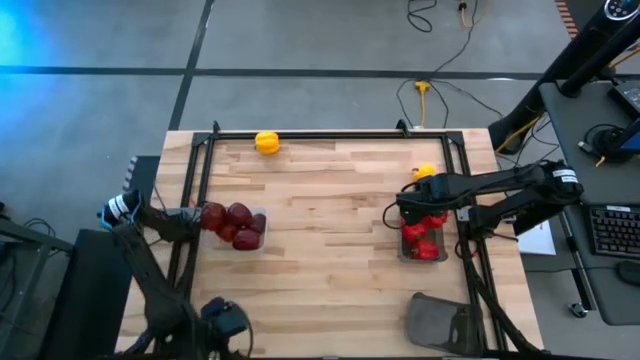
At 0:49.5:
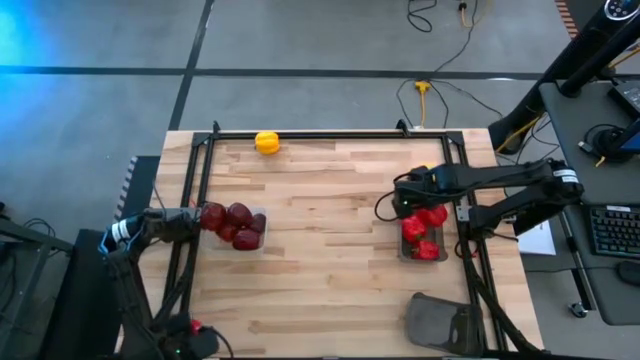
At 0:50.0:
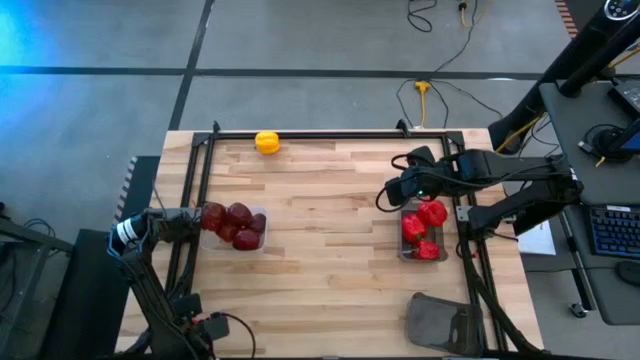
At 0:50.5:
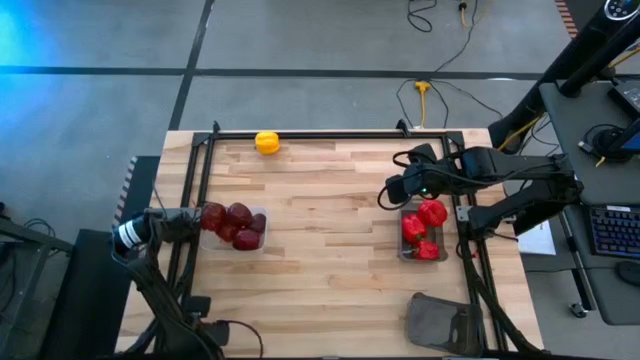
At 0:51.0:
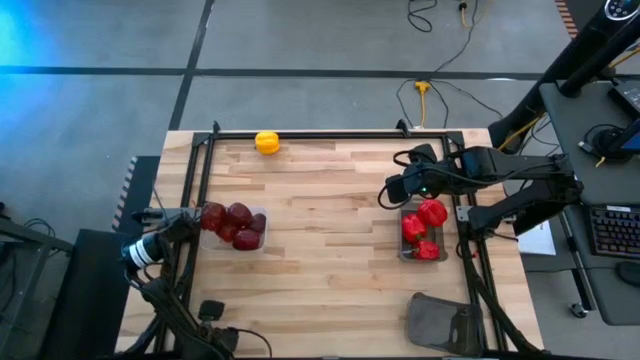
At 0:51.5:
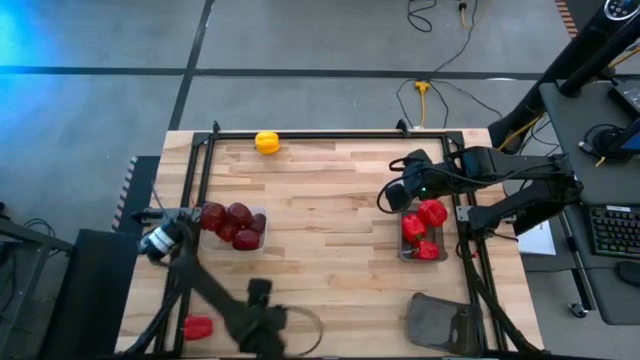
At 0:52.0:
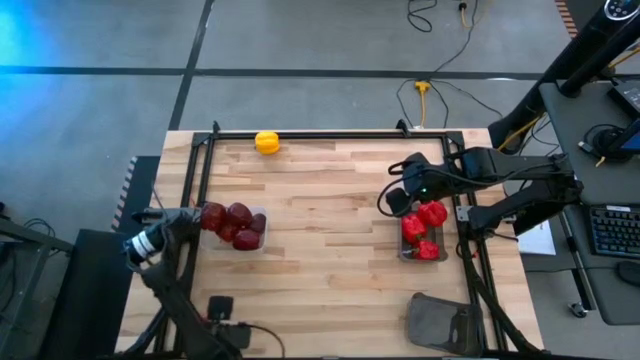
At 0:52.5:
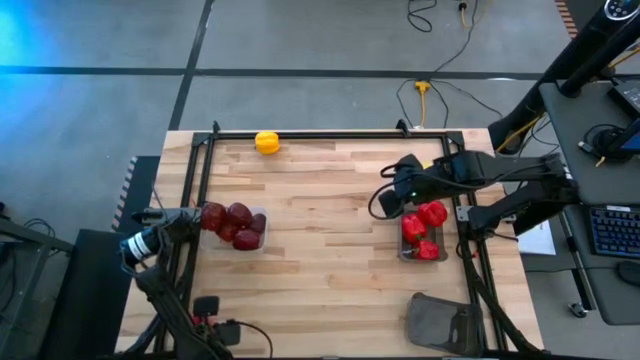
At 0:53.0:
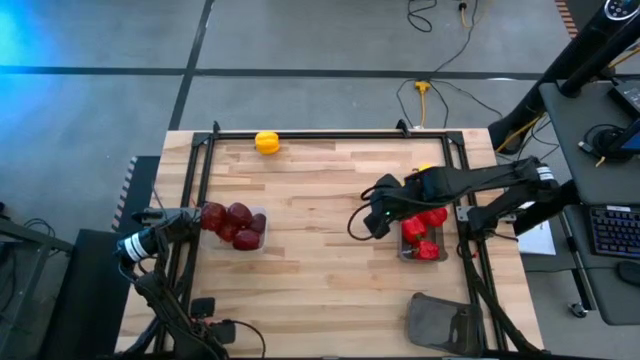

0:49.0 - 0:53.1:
Task: Sort produce into baskets
Put the red bell pepper in the top black bin

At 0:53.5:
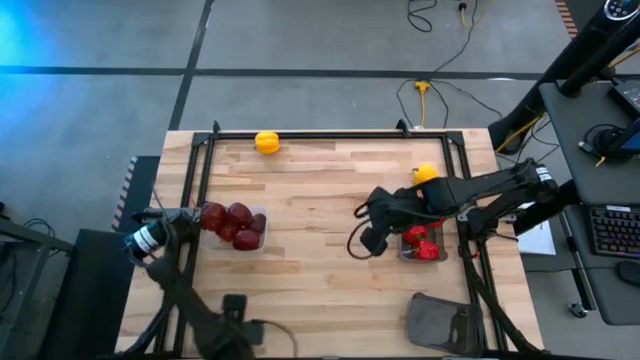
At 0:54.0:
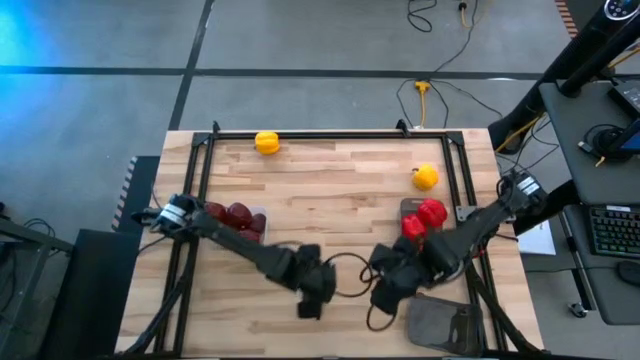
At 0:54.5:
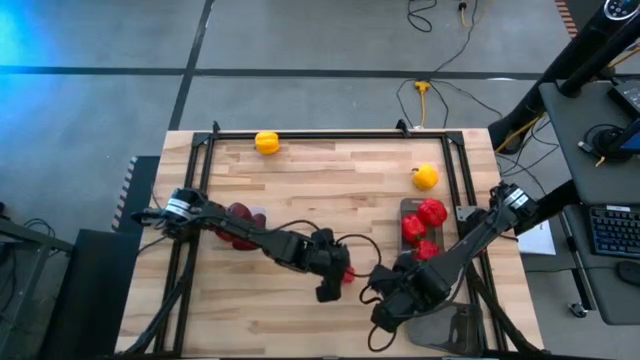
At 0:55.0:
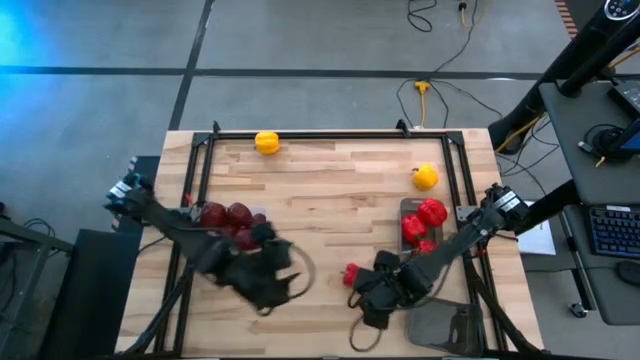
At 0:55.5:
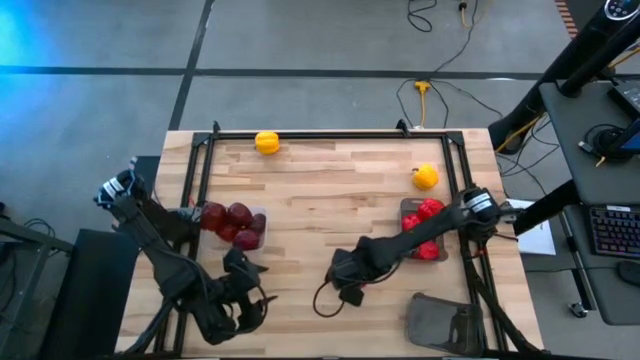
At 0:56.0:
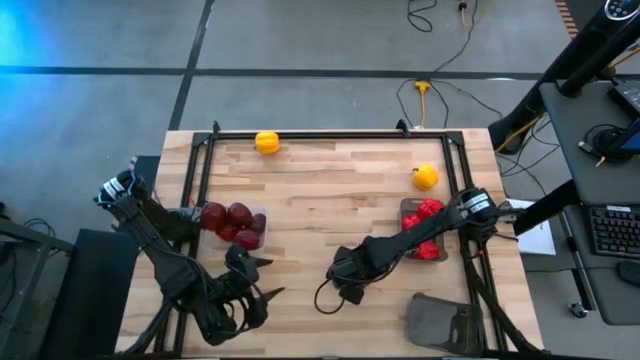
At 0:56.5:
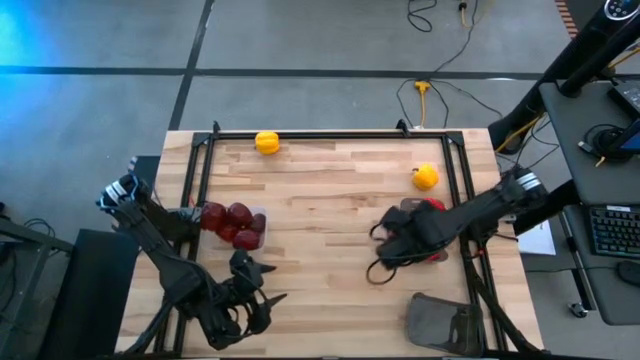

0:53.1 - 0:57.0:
Put the red bell pepper in the top black bin

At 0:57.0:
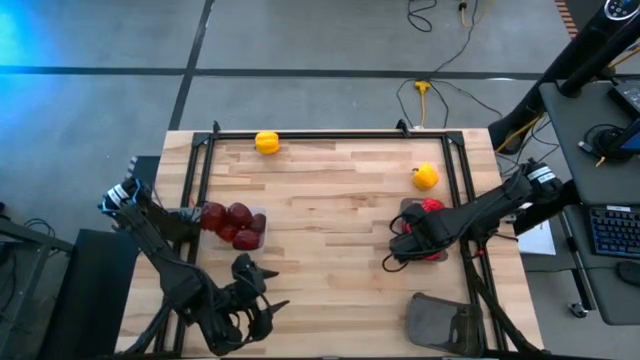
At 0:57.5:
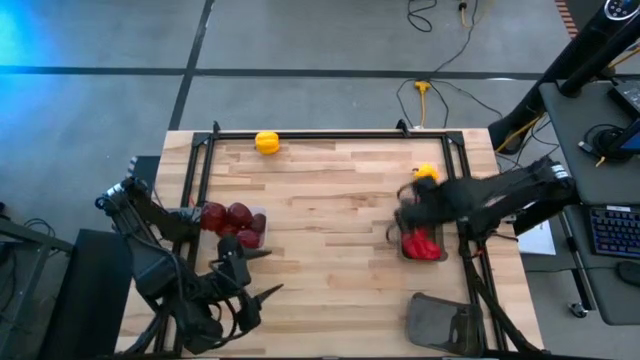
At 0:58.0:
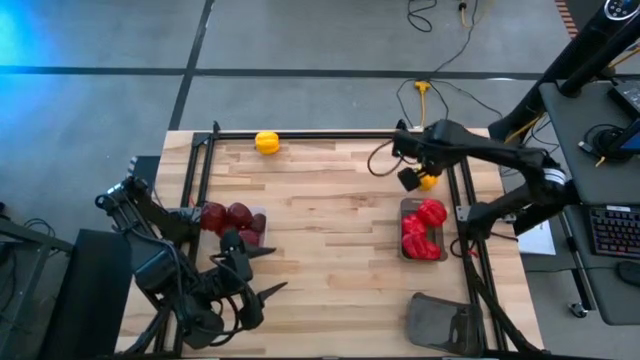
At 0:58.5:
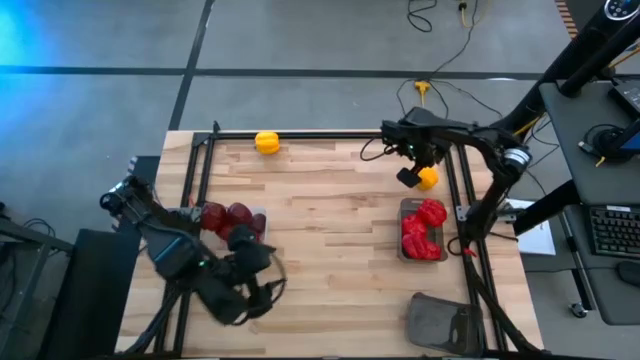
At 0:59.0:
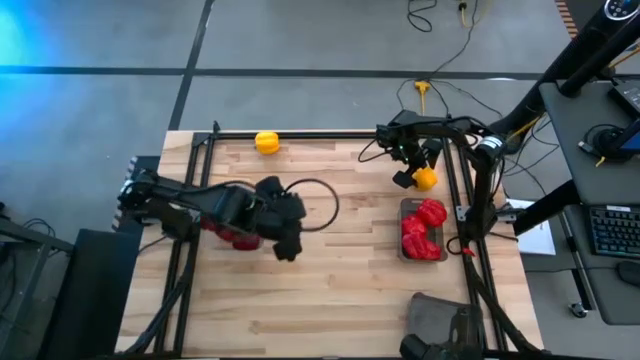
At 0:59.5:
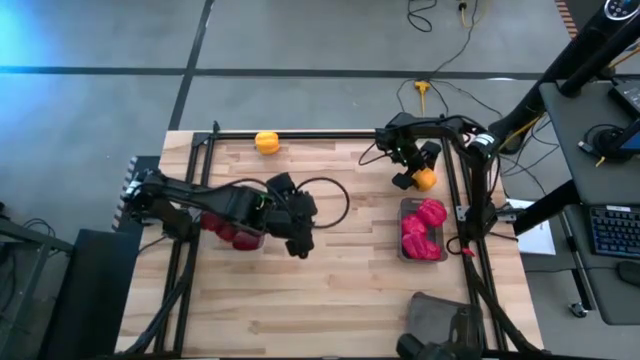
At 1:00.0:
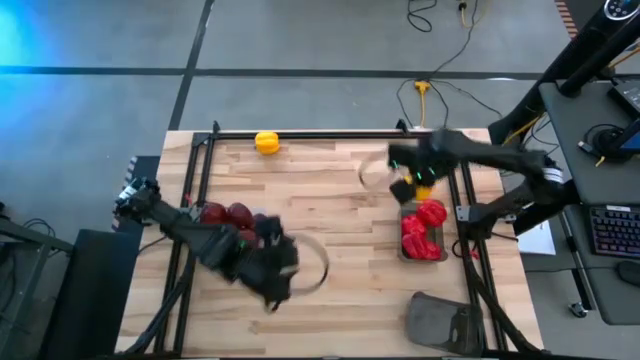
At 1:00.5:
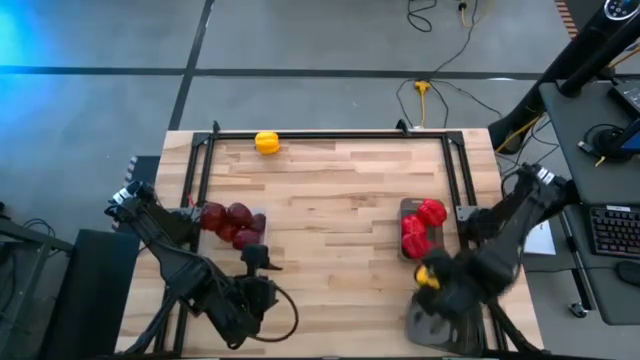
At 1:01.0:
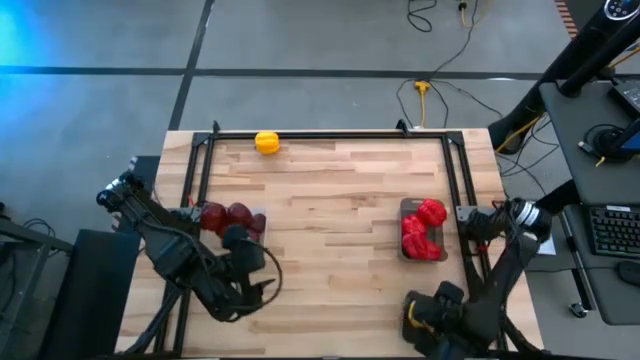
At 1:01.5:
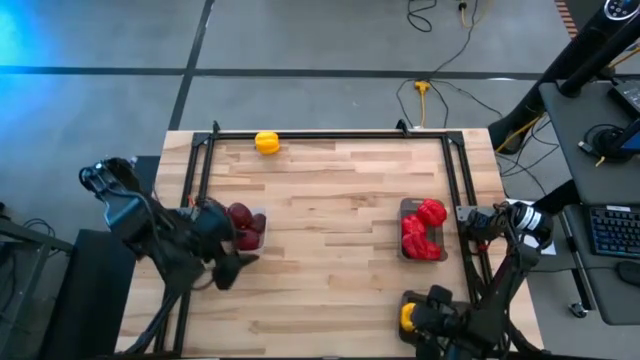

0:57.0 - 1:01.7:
Put the right yellow bell pepper in the bottom black bin

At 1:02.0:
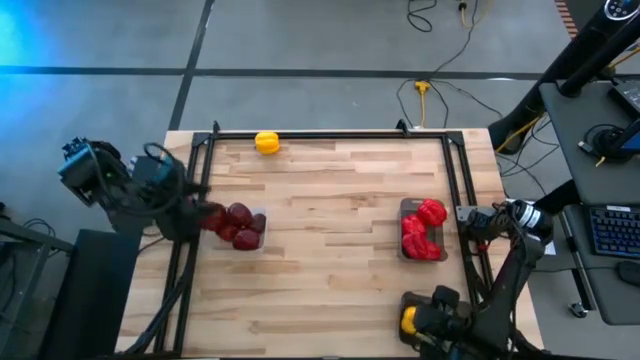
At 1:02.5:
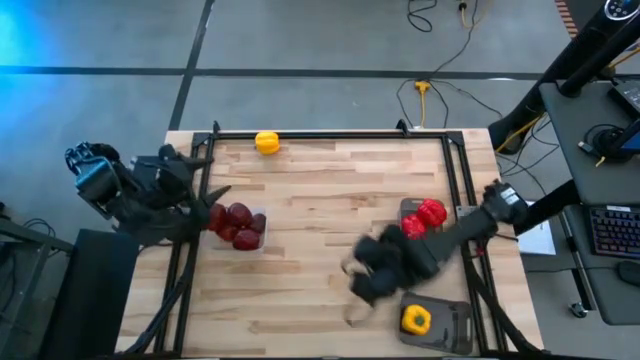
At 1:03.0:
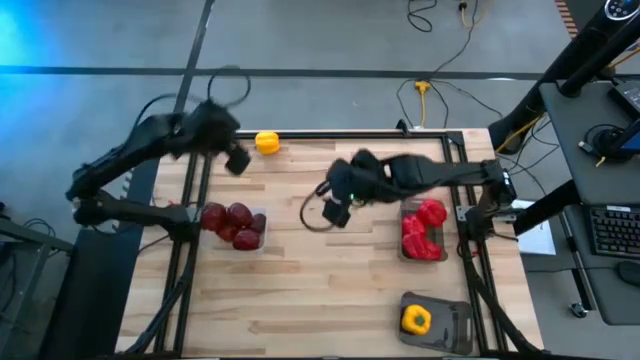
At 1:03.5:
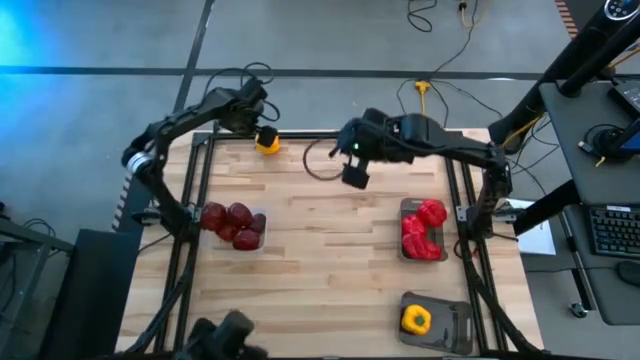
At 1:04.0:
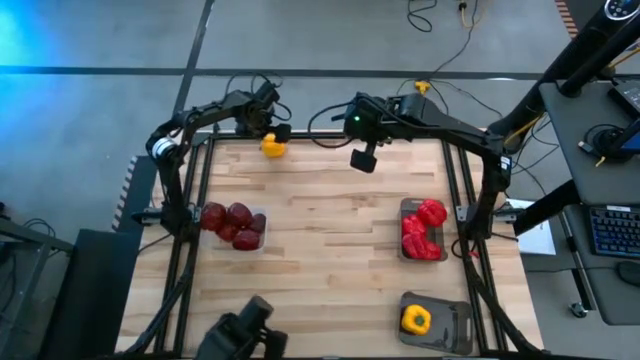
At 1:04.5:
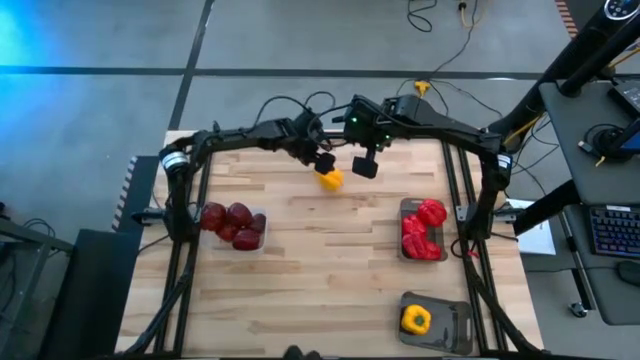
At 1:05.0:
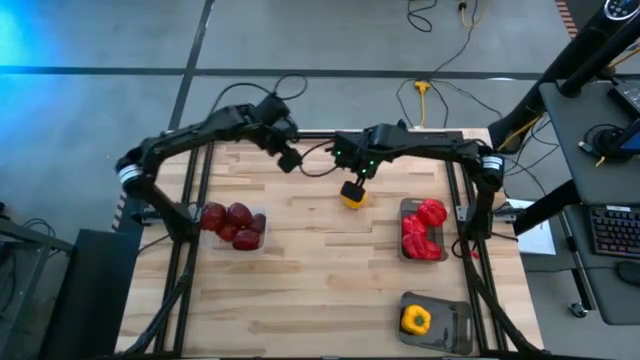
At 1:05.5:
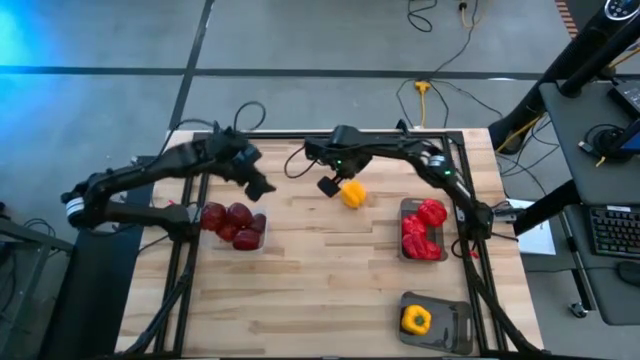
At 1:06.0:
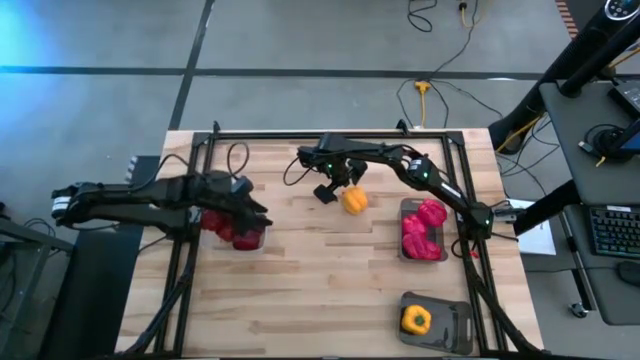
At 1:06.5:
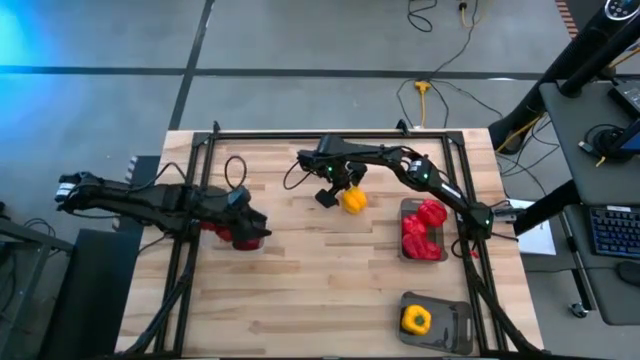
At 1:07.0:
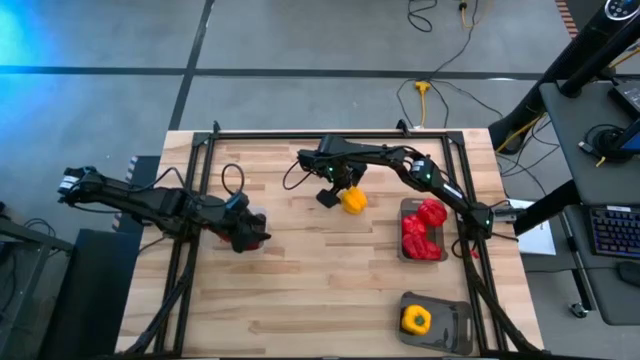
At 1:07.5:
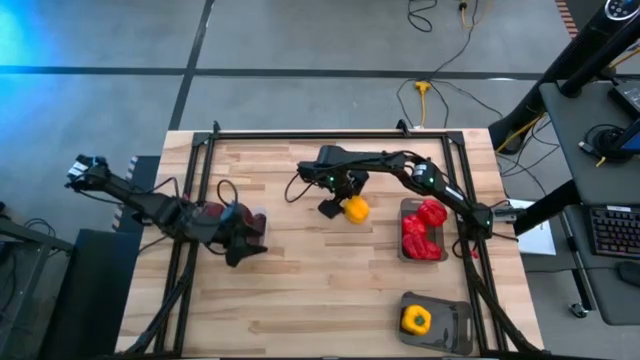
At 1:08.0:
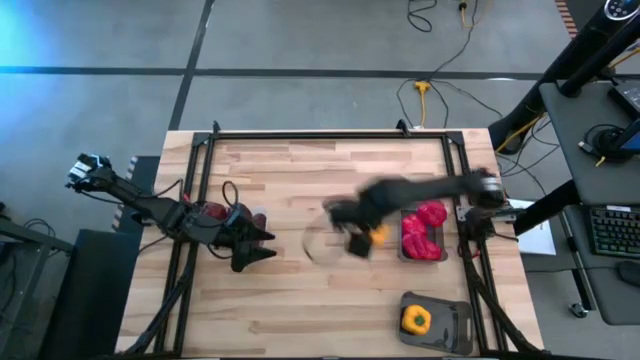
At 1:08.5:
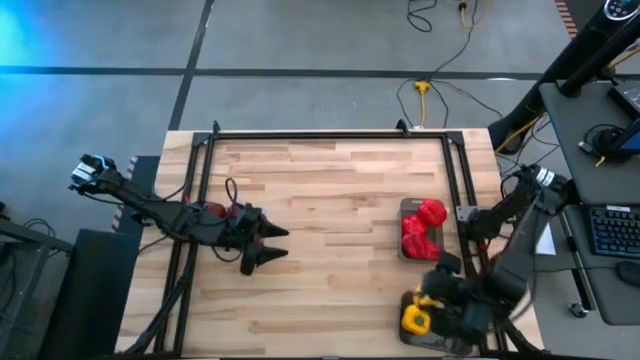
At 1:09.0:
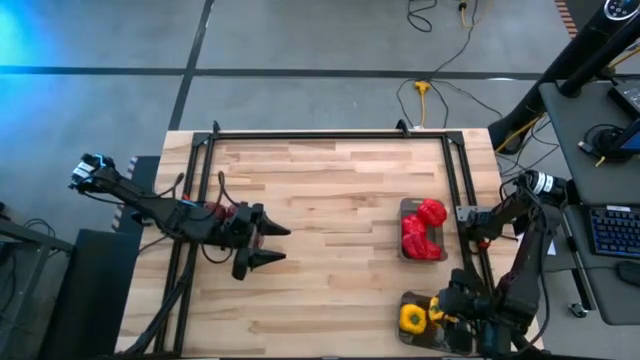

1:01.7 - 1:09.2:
Put the yellow bell pepper in the bottom black bin

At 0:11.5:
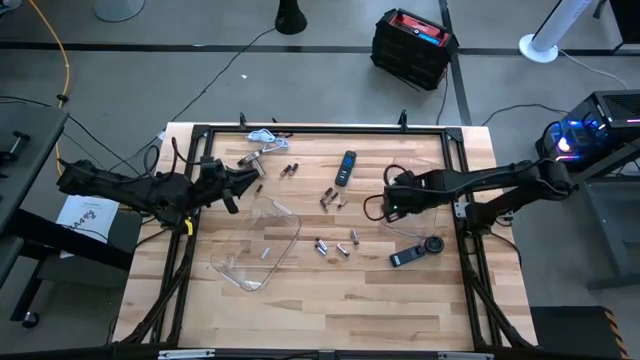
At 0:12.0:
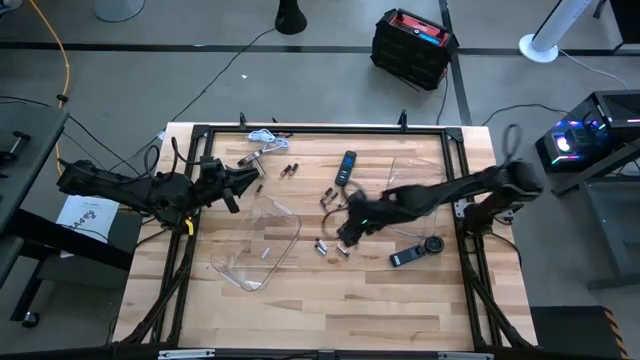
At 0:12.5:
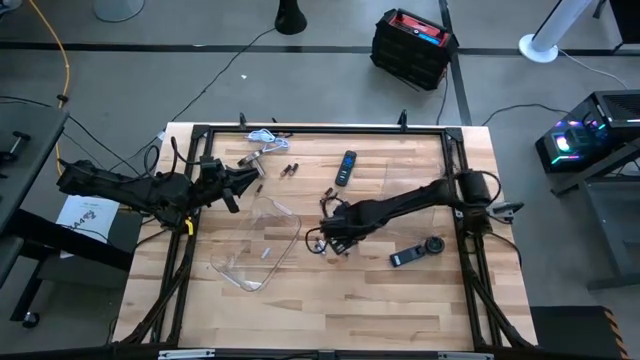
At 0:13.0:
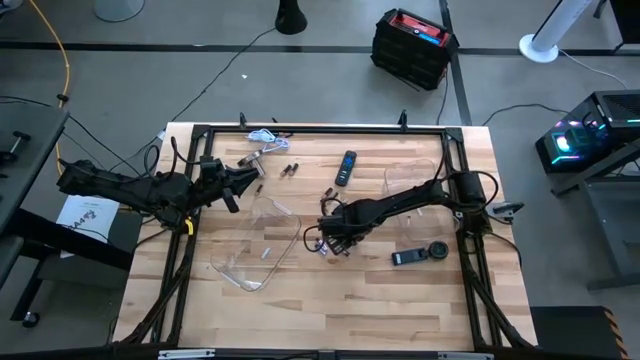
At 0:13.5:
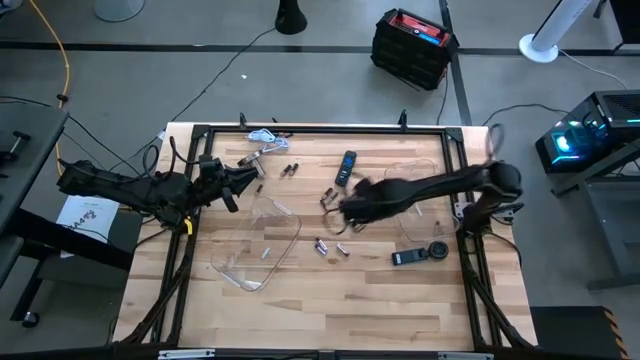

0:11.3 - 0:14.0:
Task: Sort batteries
Put the white battery into the right transparent bin
